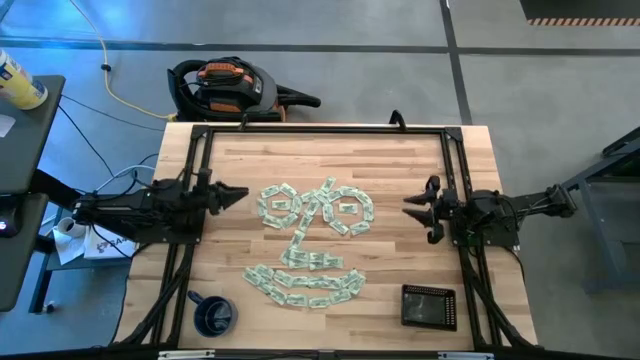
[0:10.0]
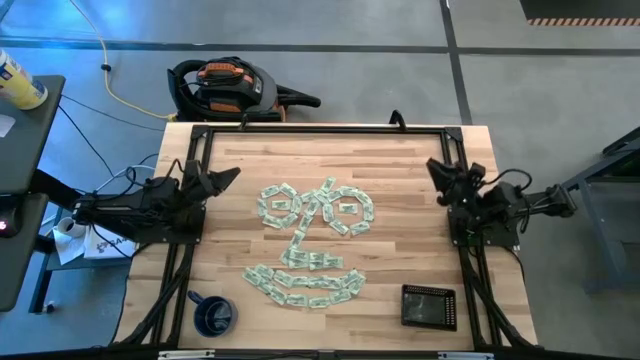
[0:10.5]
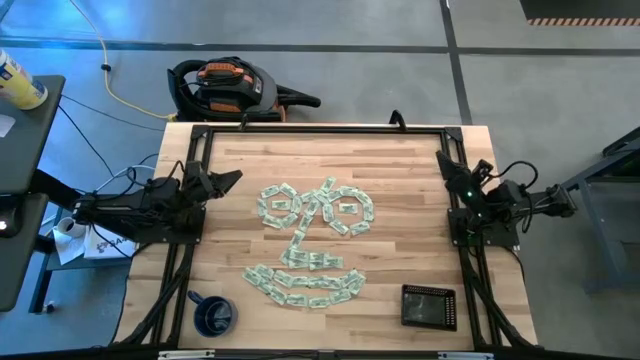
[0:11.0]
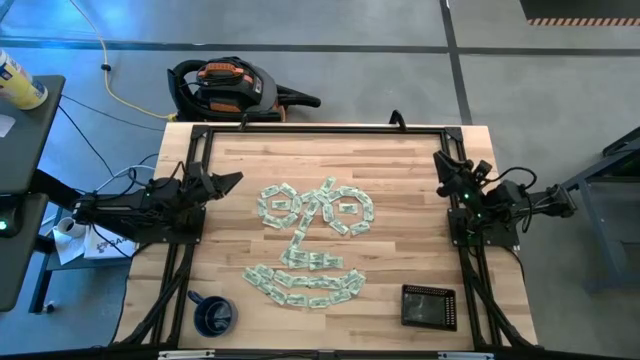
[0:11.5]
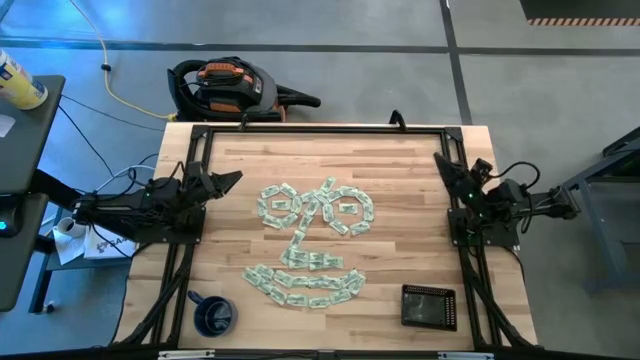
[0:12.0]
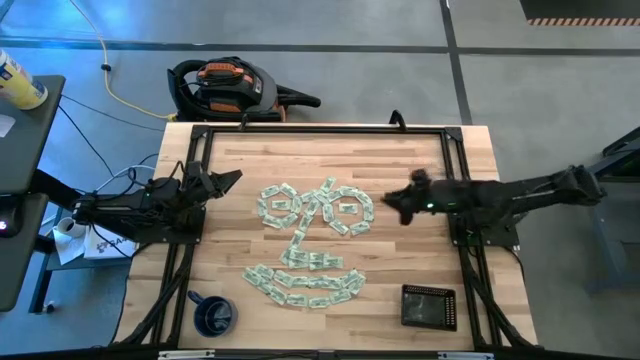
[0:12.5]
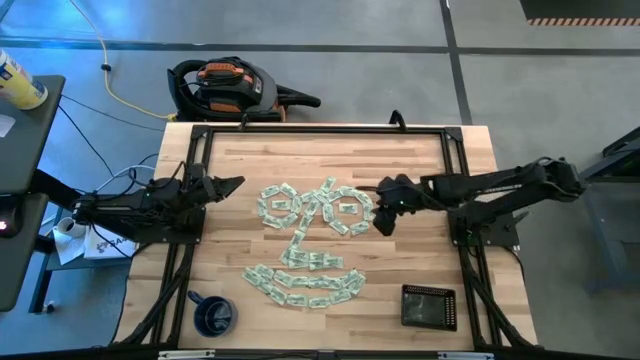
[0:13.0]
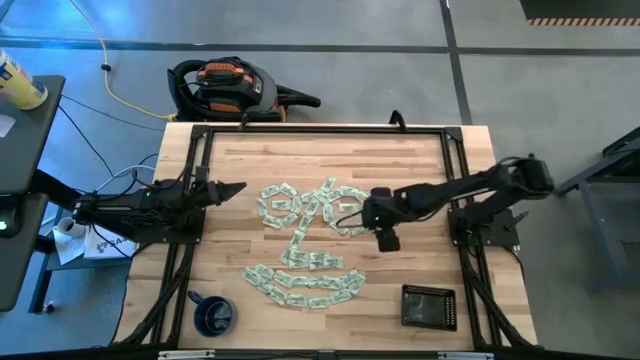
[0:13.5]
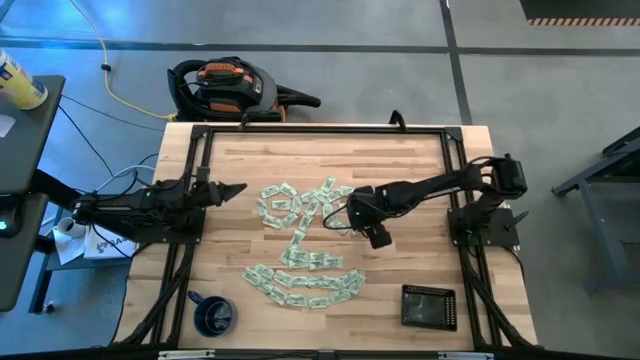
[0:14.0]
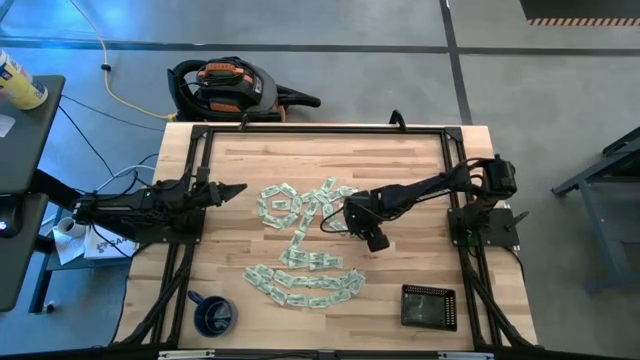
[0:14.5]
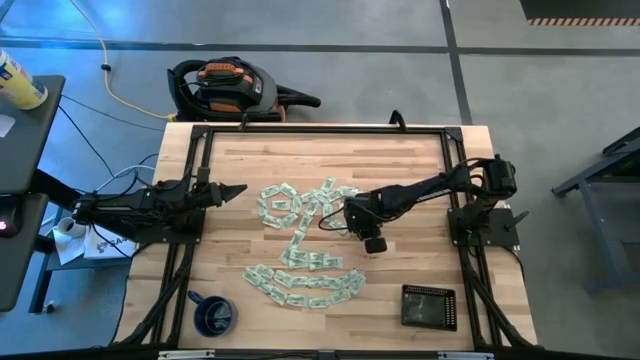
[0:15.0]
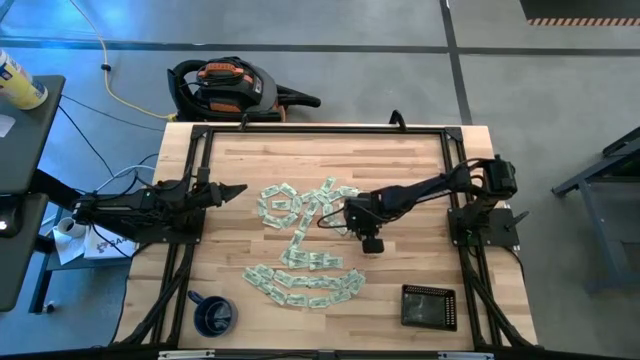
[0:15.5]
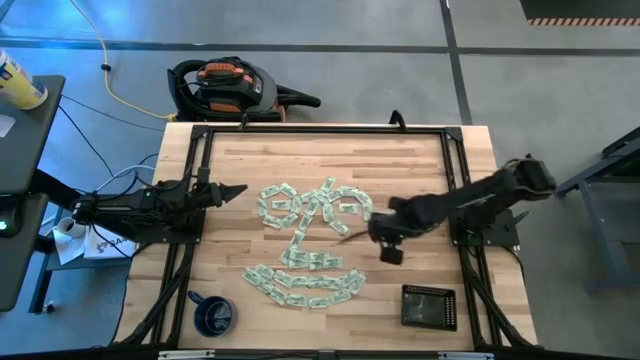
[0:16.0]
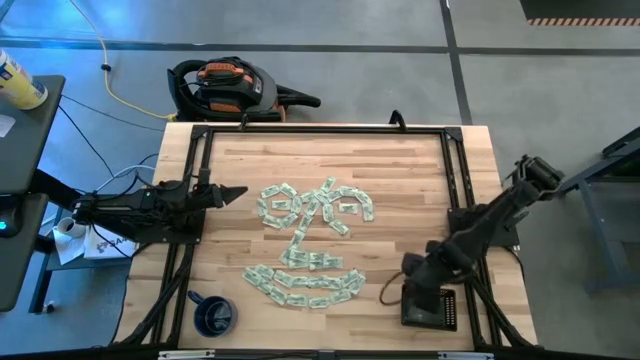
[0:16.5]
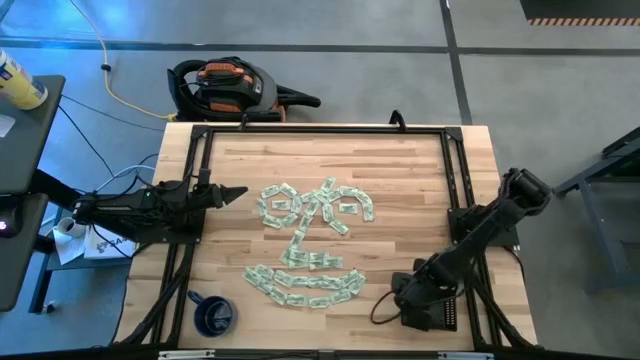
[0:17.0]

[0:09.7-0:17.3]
Task: Pick and place Stevia / Truvia into bins
Put the stevia packet into the black bin

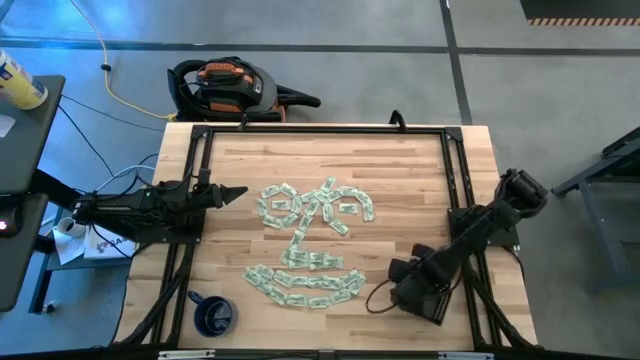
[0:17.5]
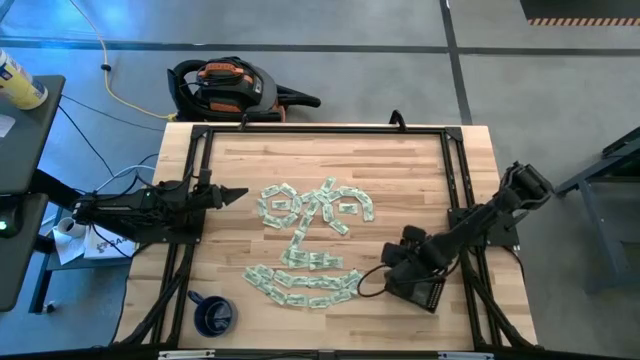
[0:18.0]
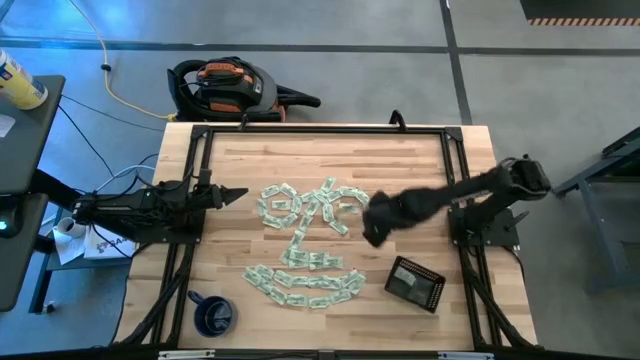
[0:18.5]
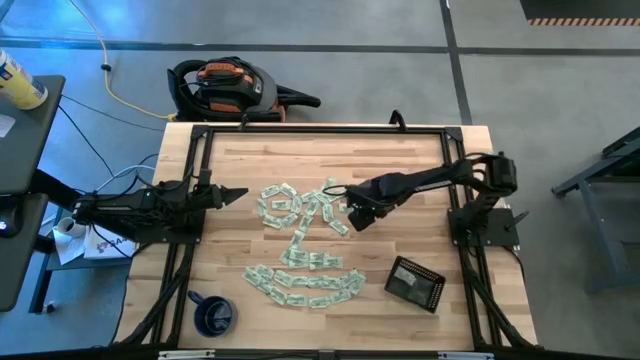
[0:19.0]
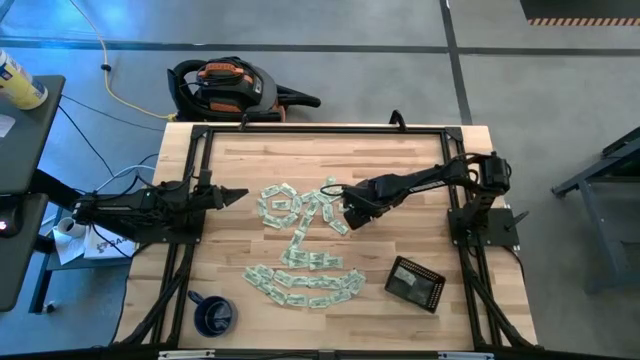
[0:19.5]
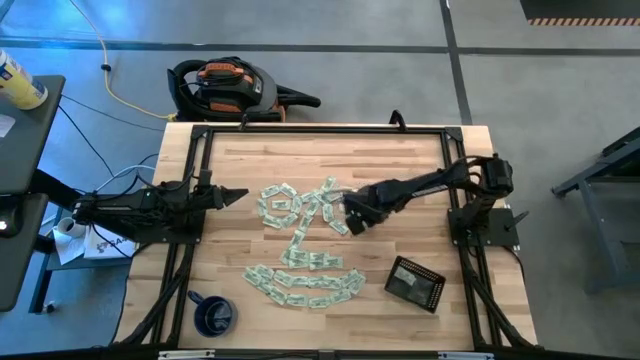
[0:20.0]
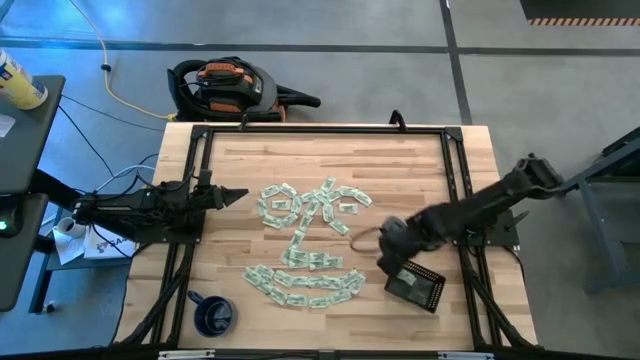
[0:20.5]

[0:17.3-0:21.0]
Put the stevia packet into the black bin

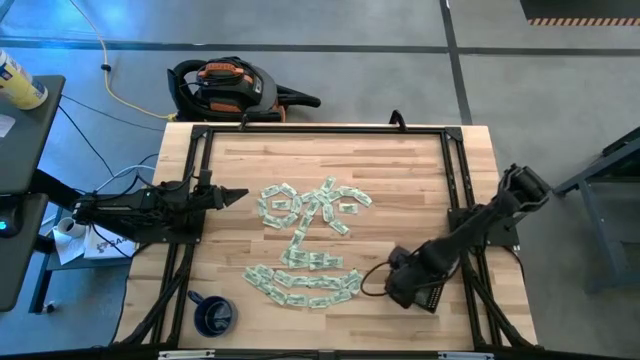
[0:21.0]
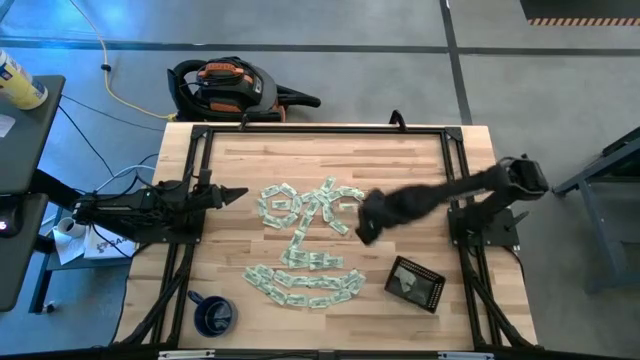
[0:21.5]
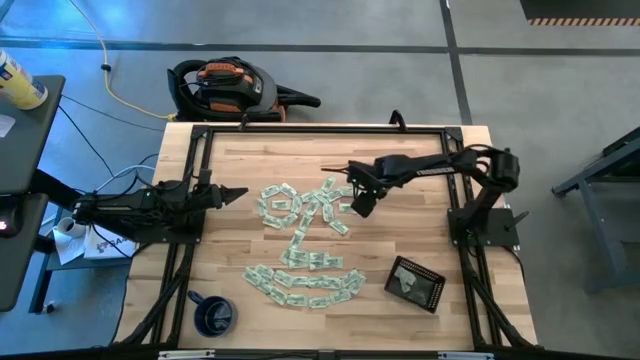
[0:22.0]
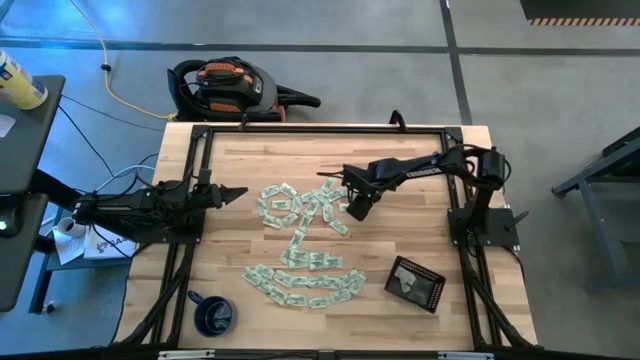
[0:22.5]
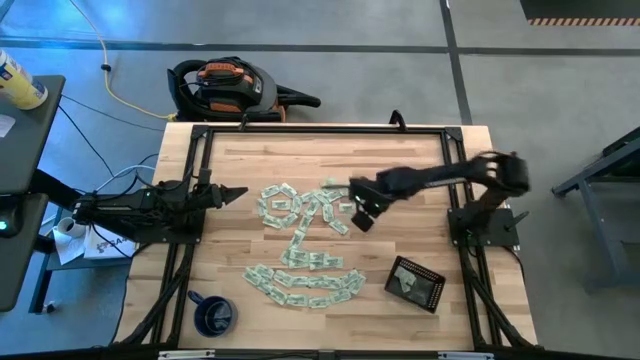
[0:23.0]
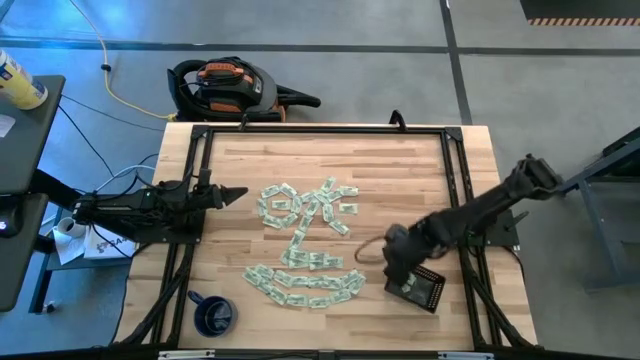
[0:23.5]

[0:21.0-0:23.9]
Put the stevia packet into the black bin

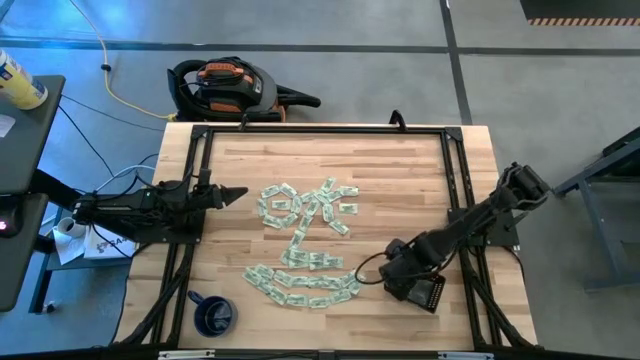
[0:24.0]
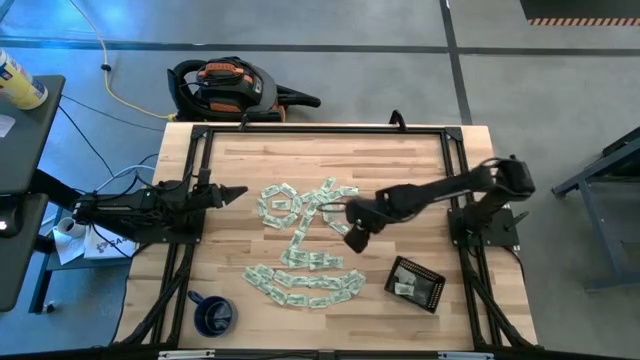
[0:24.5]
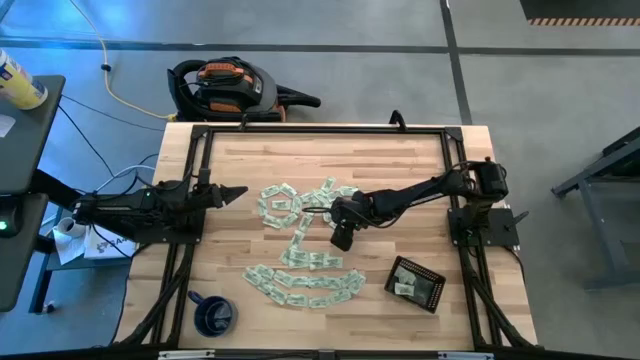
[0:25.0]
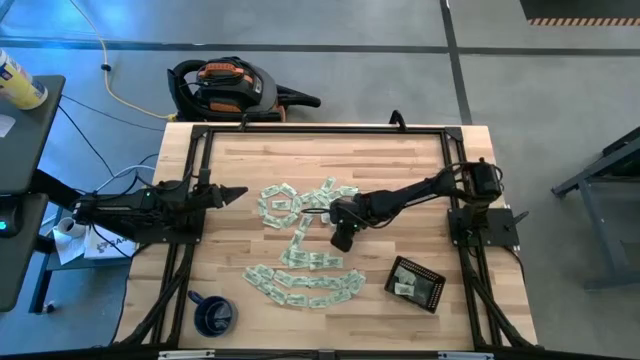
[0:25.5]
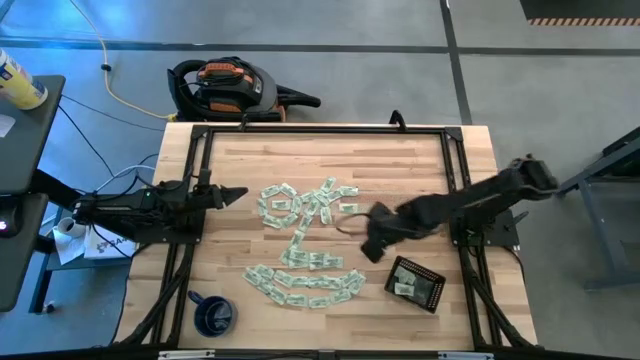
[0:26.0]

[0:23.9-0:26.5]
Put the stevia packet into the black bin

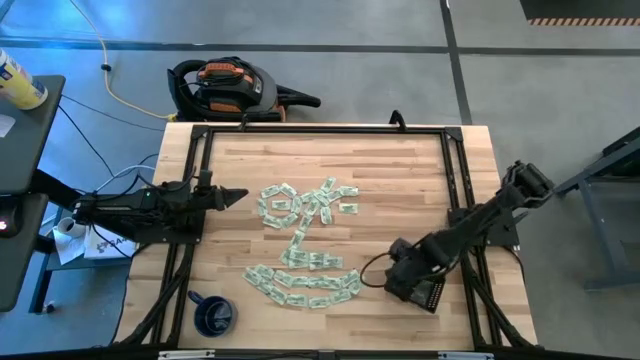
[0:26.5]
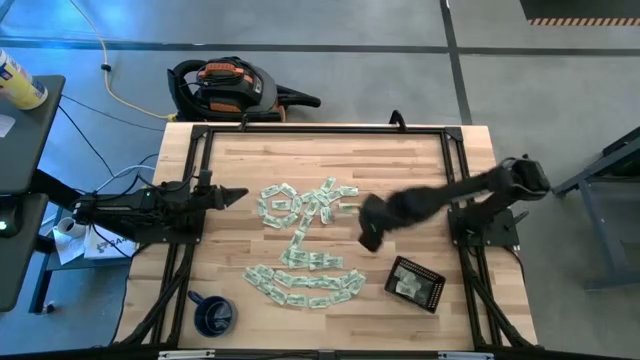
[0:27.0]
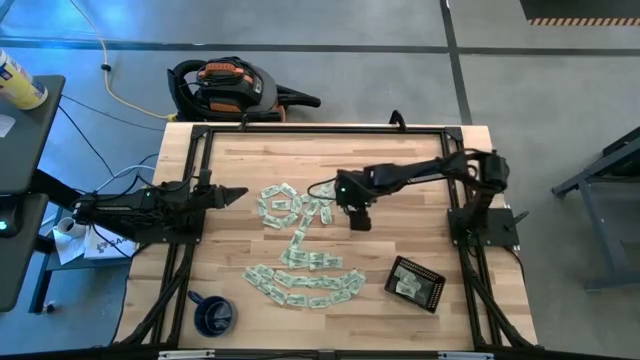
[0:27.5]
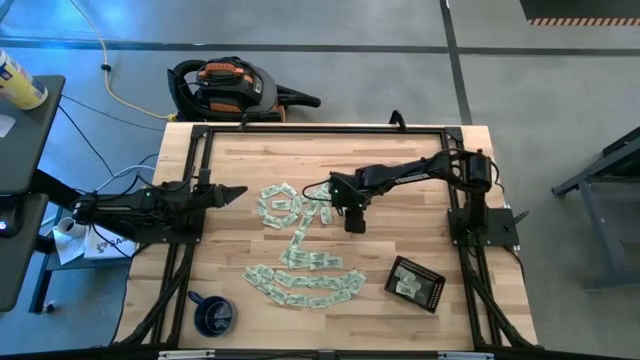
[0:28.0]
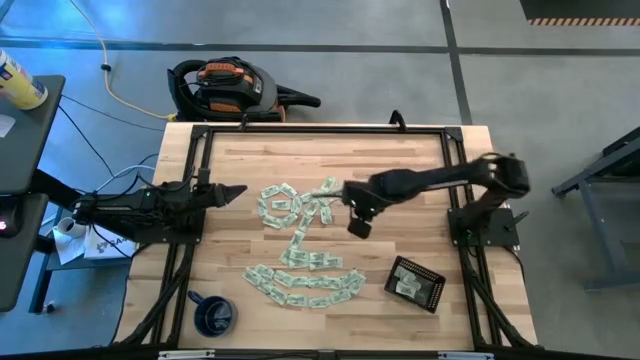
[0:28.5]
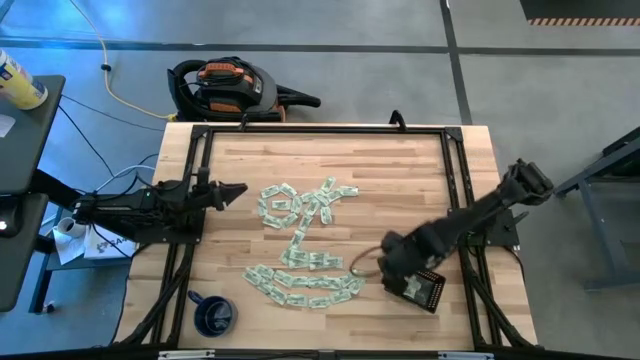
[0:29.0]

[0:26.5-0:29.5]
Put the stevia packet into the black bin

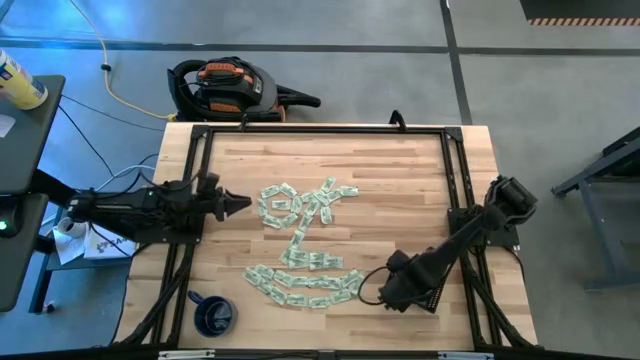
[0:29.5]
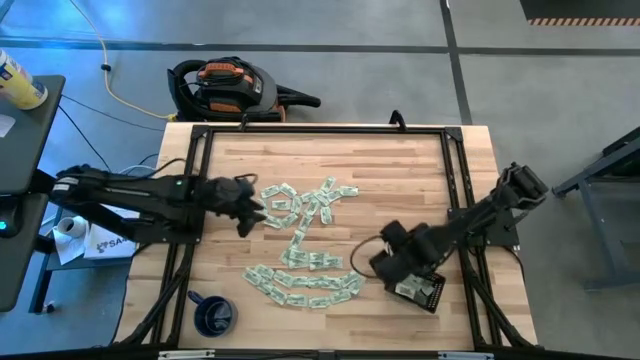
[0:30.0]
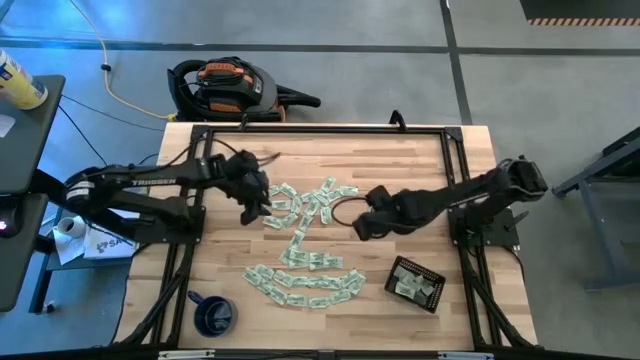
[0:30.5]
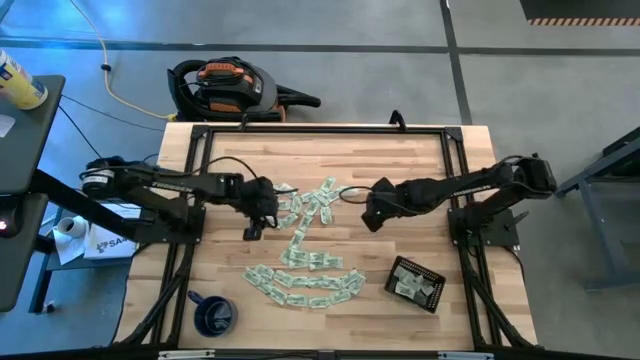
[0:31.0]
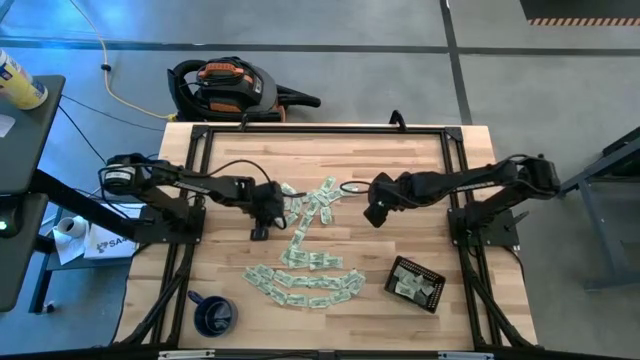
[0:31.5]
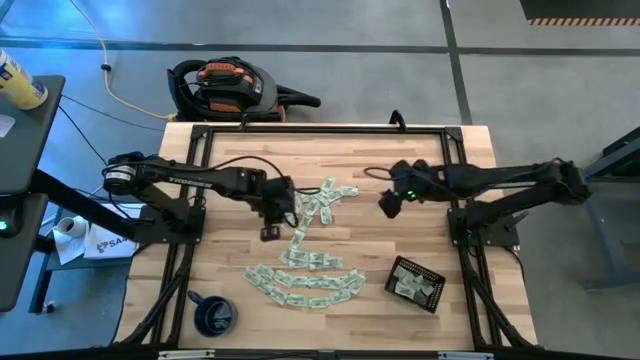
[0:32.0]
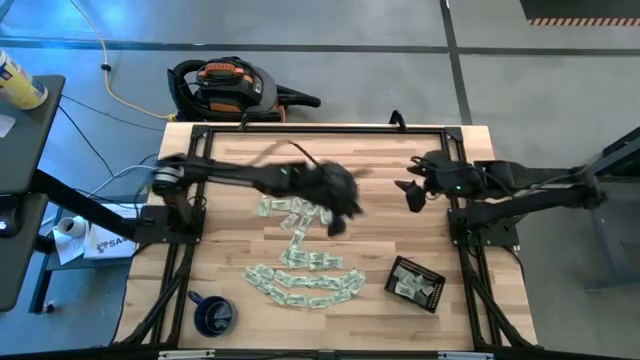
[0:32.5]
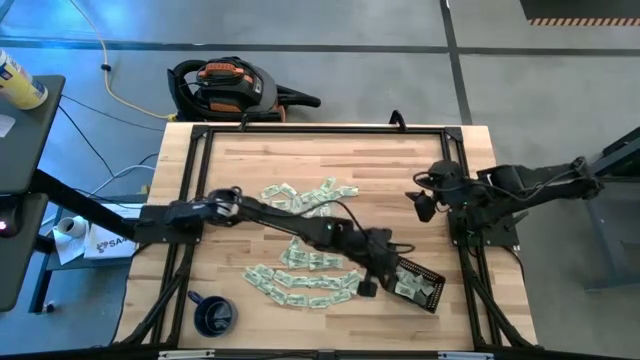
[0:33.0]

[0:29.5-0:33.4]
Put the stevia packet into the black bin
